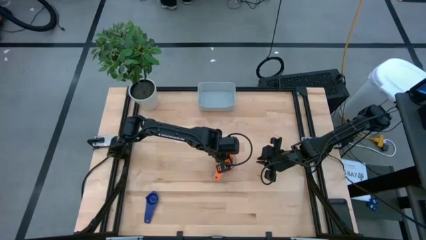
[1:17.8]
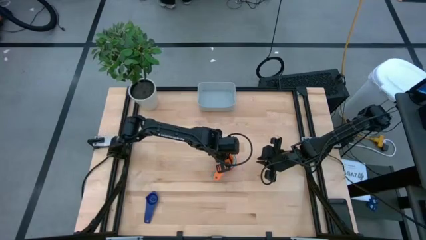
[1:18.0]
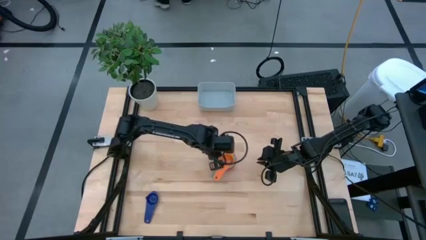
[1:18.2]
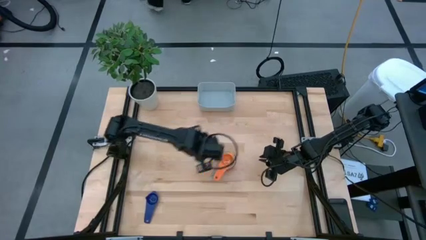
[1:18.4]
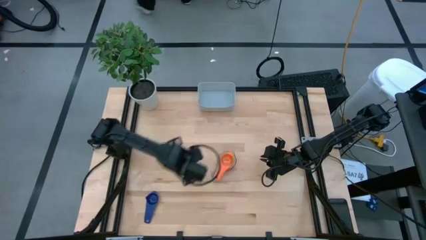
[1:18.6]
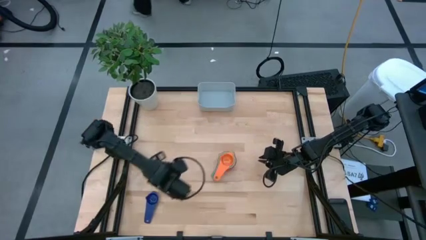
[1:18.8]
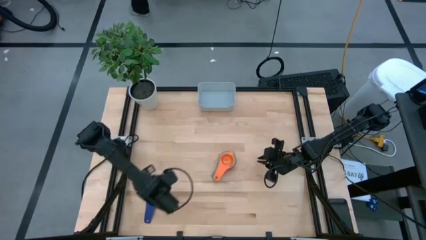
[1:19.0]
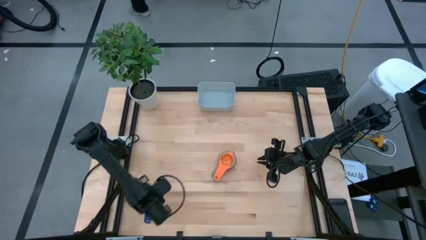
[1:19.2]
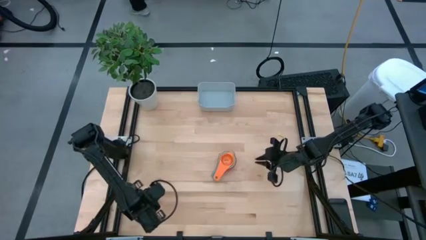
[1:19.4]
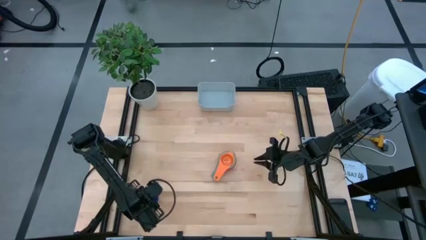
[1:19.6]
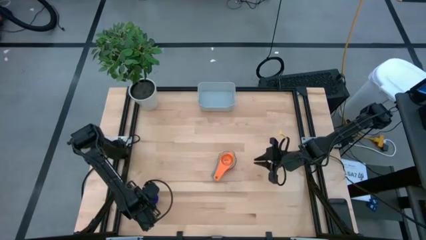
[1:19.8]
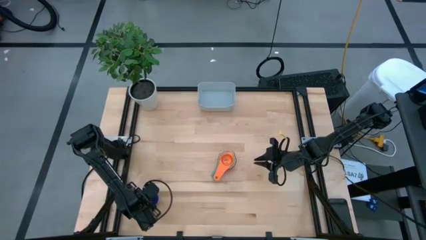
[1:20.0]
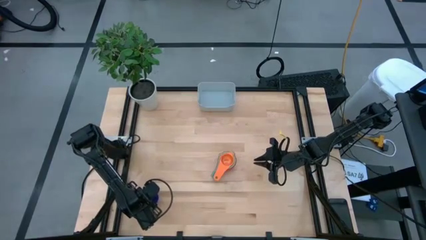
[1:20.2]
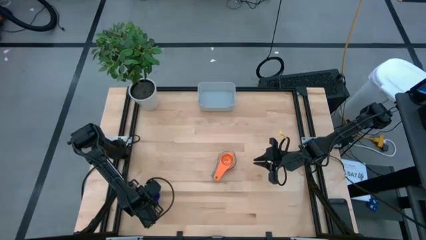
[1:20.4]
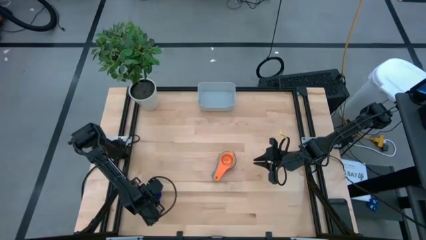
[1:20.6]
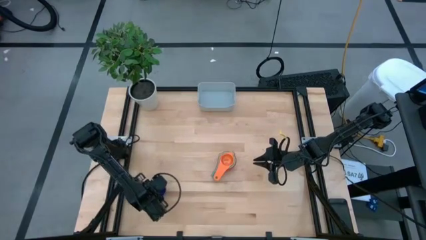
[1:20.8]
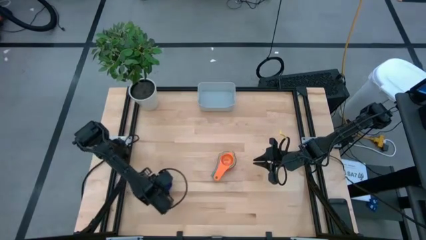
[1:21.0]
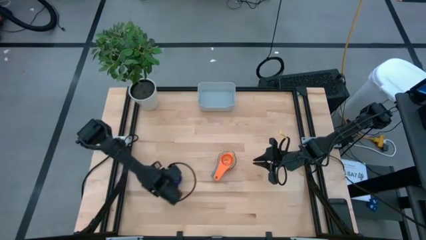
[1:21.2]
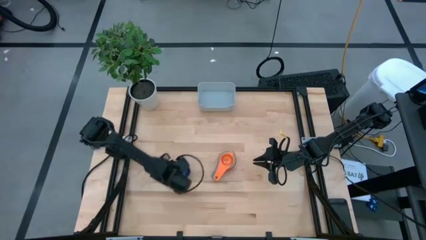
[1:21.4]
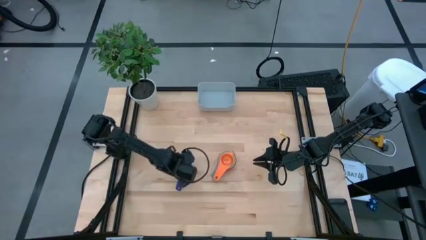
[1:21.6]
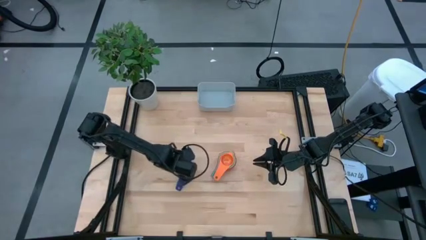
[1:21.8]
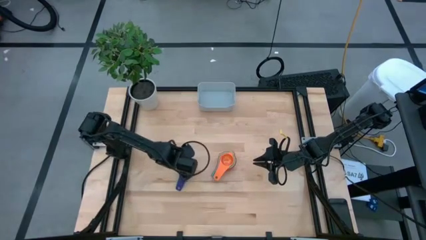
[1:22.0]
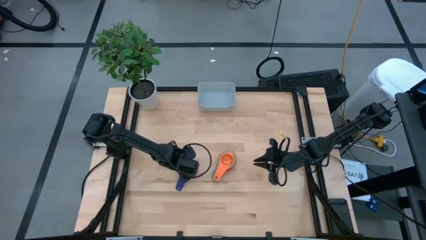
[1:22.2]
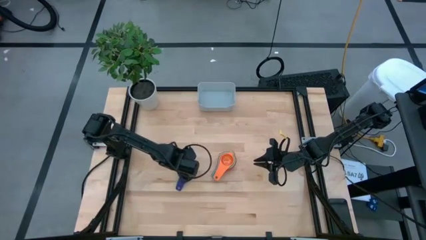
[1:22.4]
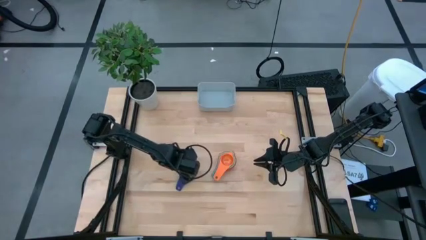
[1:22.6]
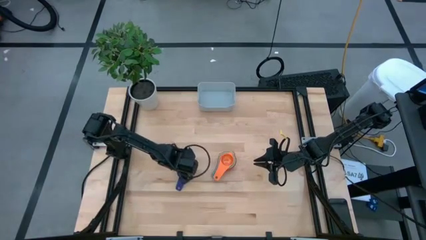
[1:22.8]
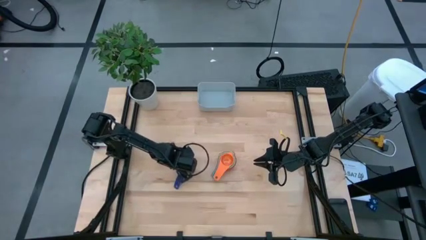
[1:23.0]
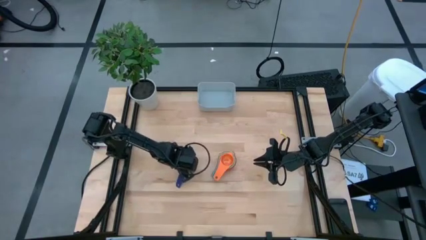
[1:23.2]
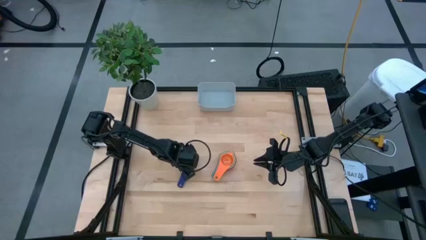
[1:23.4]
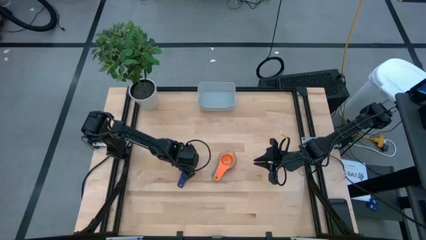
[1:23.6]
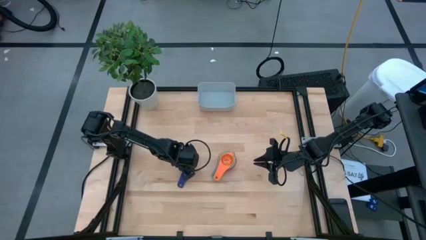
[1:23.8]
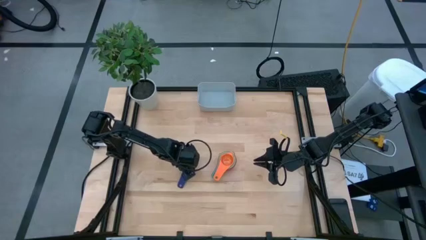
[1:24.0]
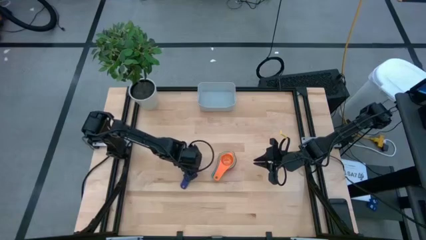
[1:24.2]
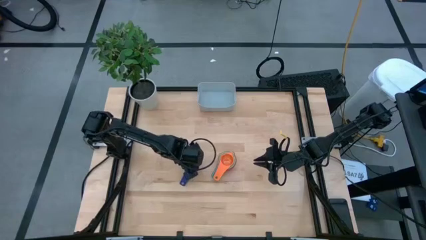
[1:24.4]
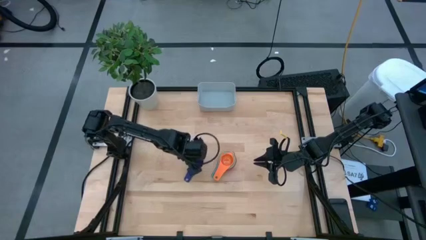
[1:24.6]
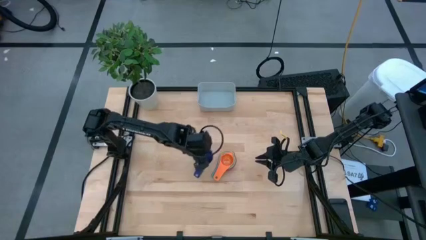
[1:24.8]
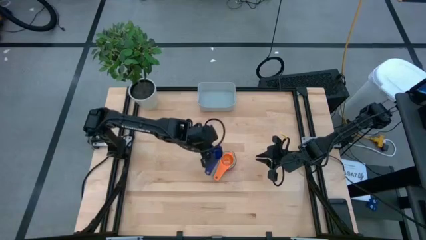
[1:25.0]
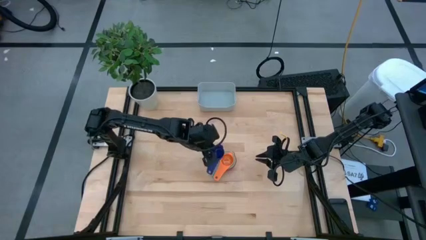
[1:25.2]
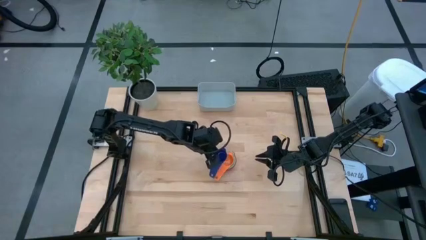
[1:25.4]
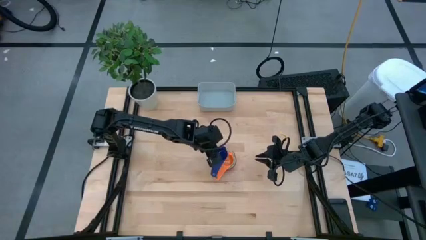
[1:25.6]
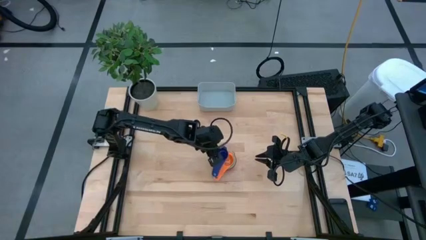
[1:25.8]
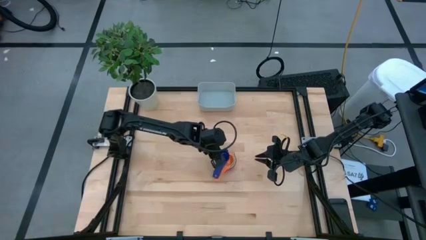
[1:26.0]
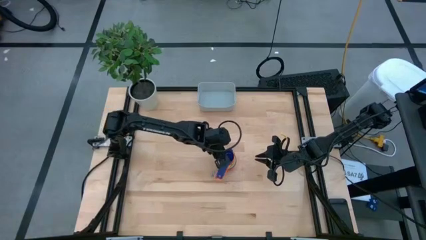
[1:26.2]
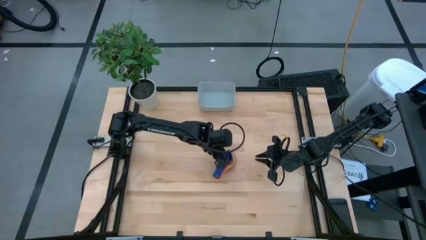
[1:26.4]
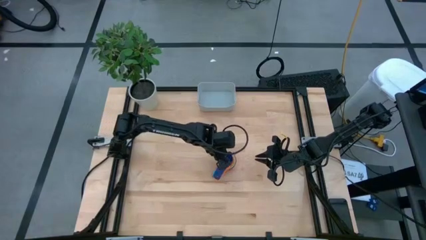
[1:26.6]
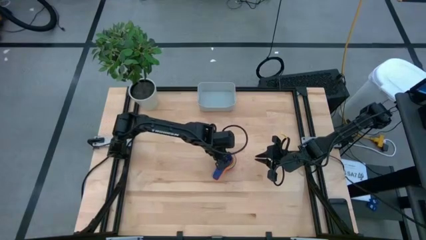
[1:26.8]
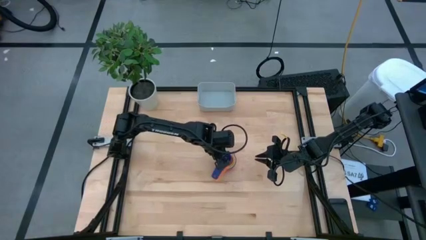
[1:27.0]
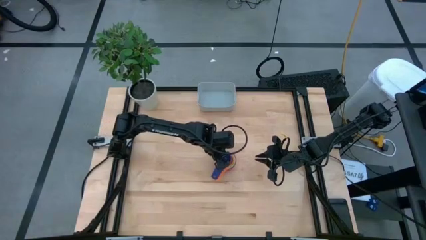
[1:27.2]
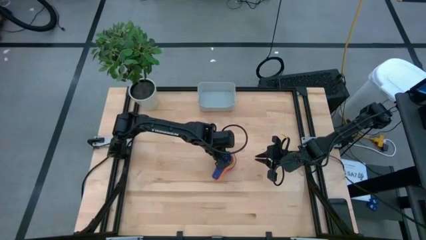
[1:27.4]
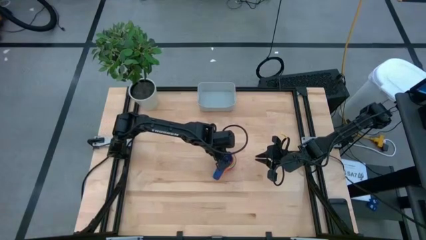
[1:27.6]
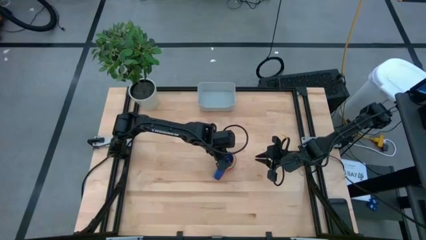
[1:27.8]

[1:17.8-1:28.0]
Task: Nest measuring cups in basket
Stack the dark blue measuring cup on top of the orange measuring cup
